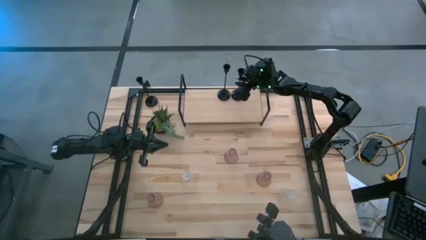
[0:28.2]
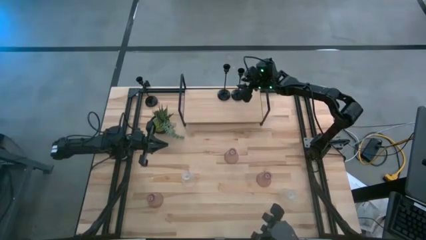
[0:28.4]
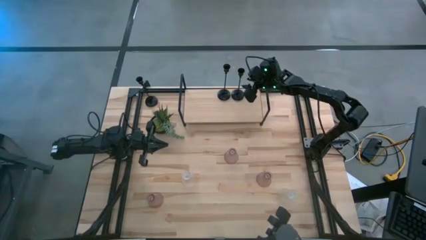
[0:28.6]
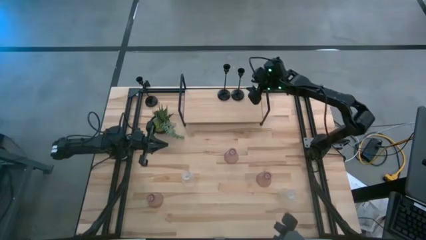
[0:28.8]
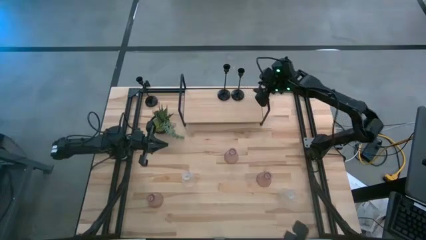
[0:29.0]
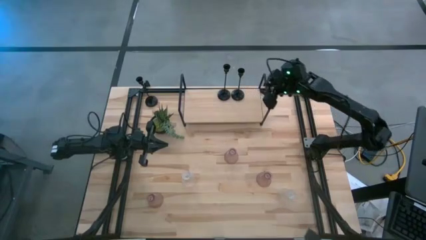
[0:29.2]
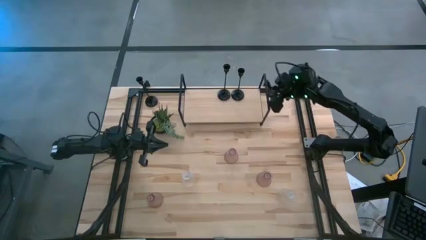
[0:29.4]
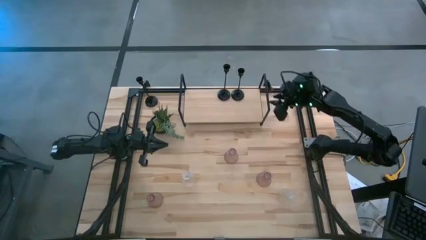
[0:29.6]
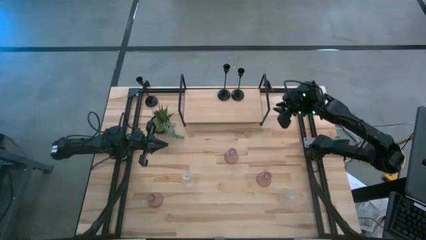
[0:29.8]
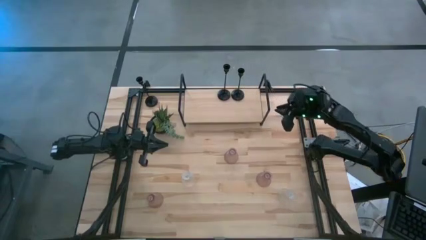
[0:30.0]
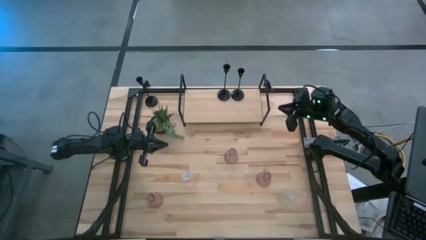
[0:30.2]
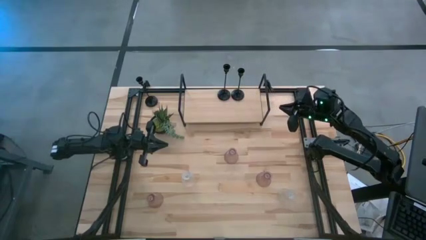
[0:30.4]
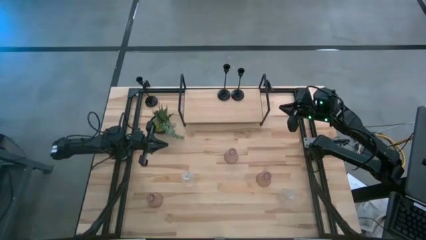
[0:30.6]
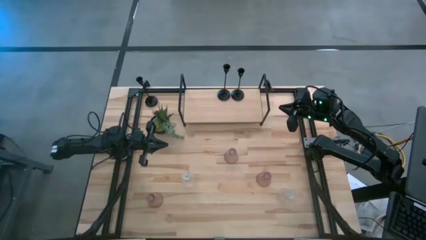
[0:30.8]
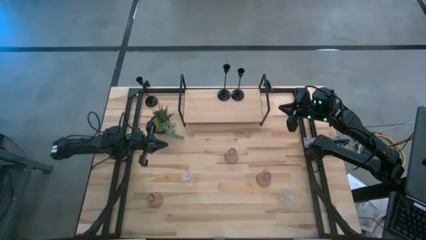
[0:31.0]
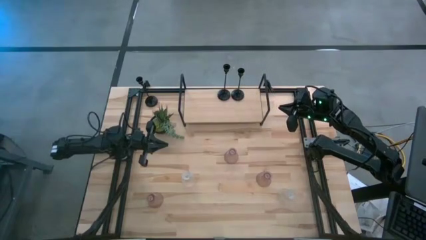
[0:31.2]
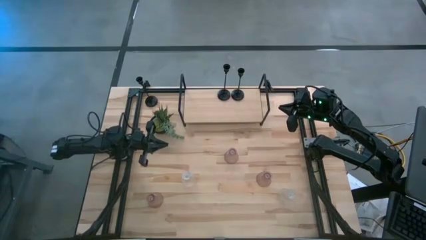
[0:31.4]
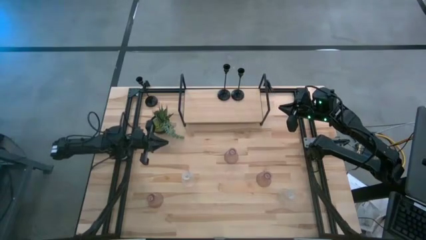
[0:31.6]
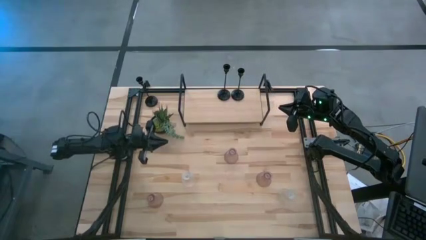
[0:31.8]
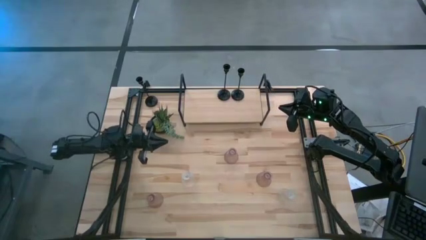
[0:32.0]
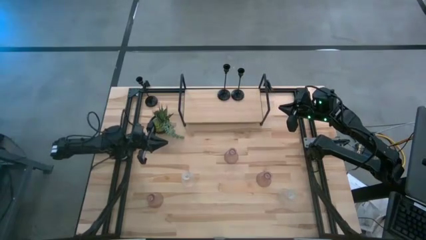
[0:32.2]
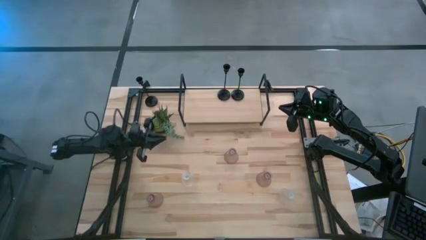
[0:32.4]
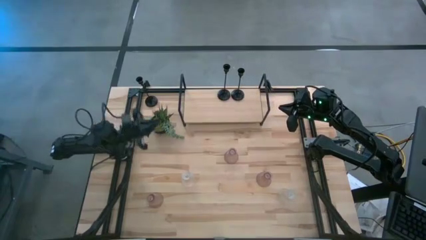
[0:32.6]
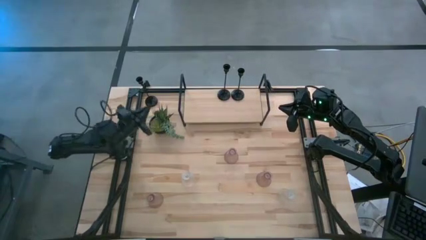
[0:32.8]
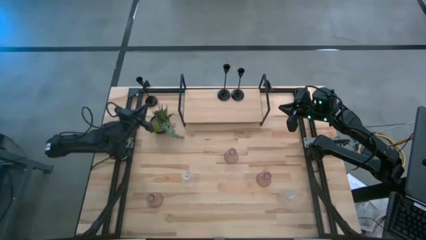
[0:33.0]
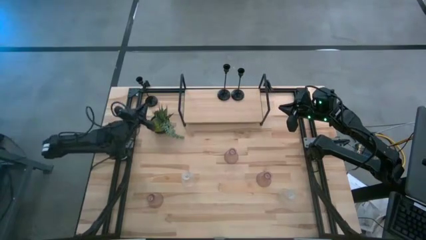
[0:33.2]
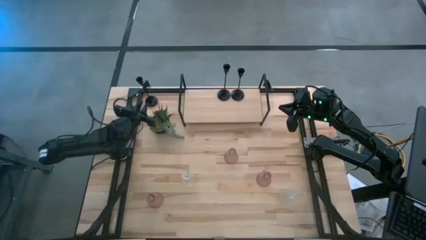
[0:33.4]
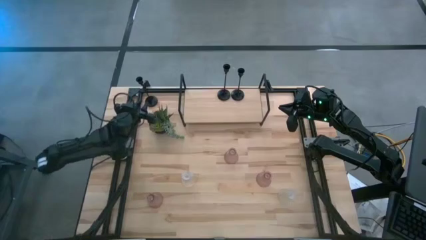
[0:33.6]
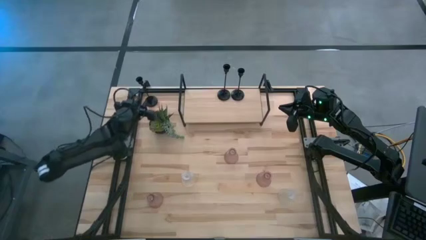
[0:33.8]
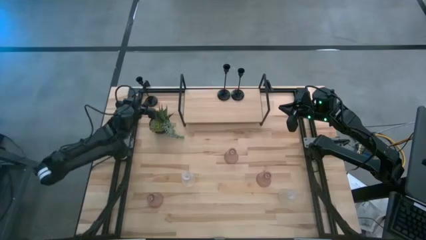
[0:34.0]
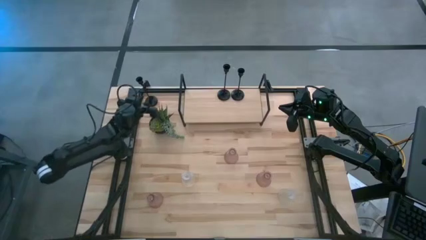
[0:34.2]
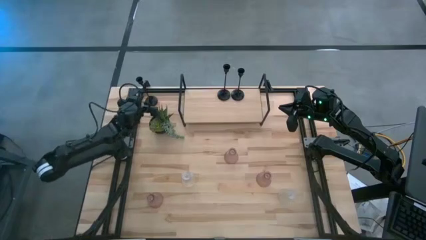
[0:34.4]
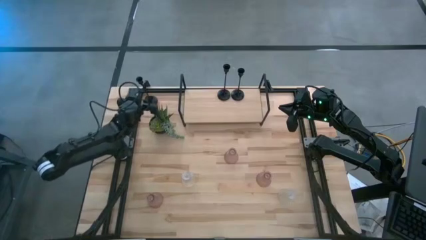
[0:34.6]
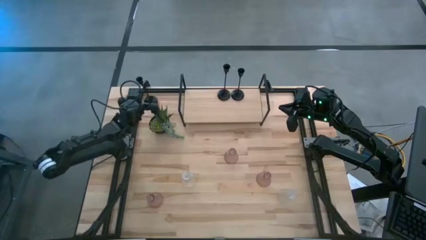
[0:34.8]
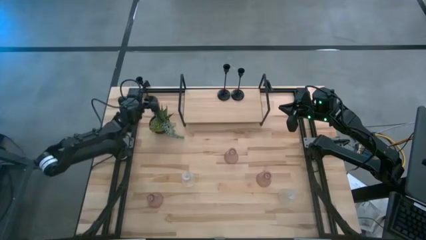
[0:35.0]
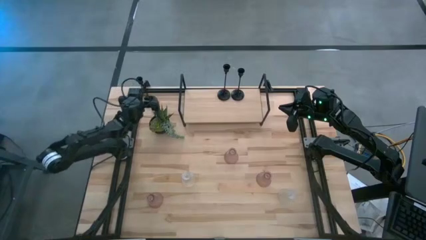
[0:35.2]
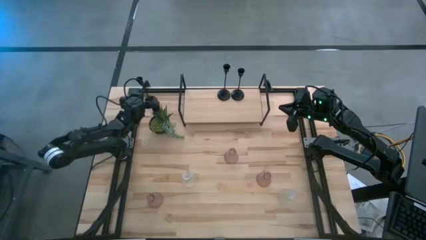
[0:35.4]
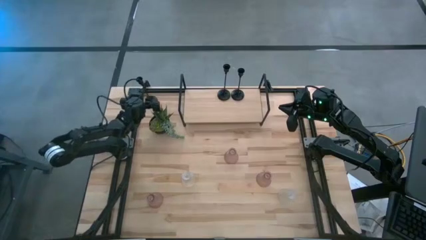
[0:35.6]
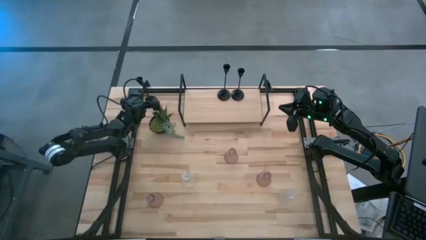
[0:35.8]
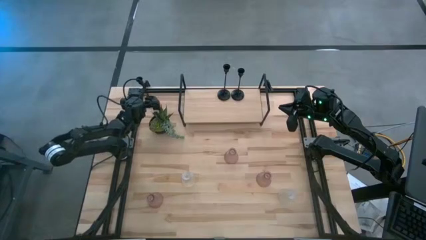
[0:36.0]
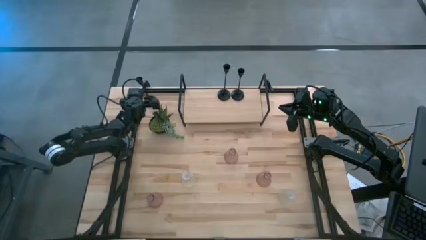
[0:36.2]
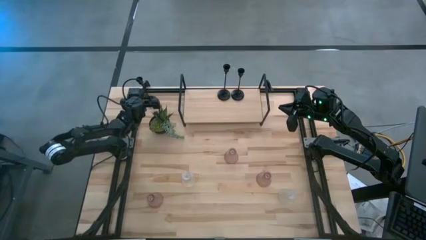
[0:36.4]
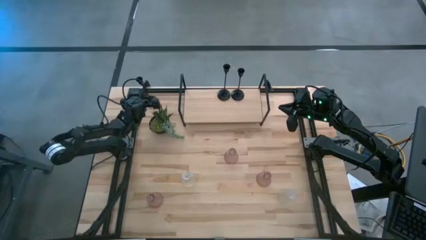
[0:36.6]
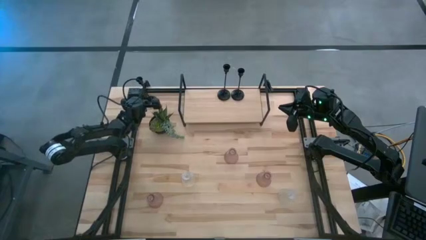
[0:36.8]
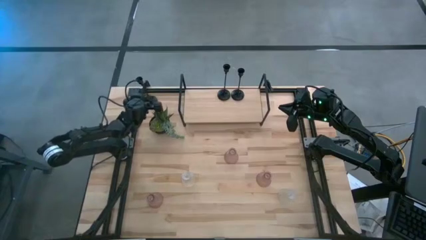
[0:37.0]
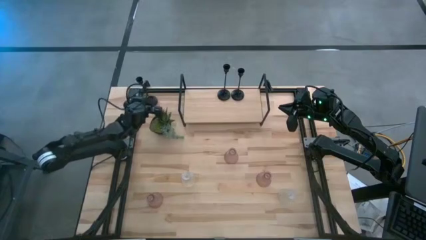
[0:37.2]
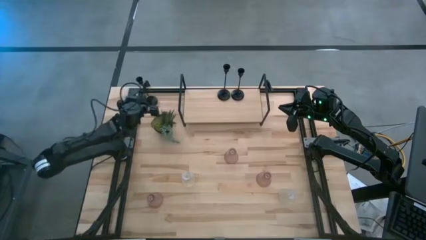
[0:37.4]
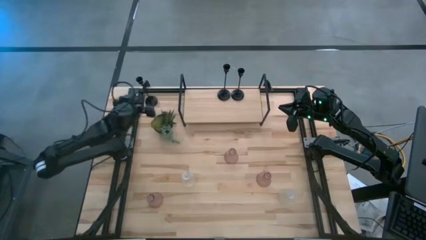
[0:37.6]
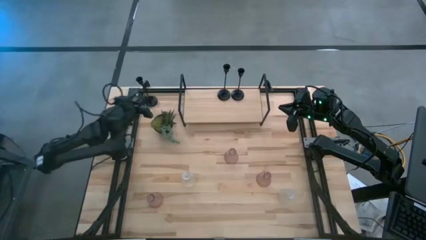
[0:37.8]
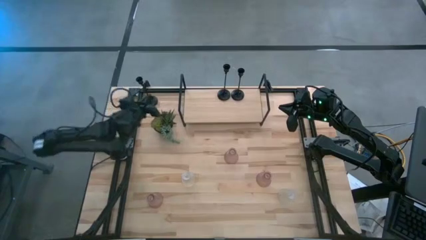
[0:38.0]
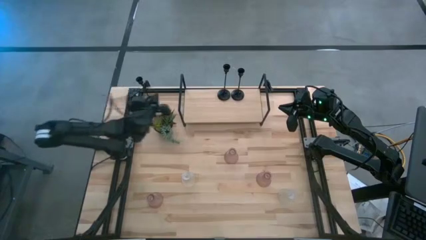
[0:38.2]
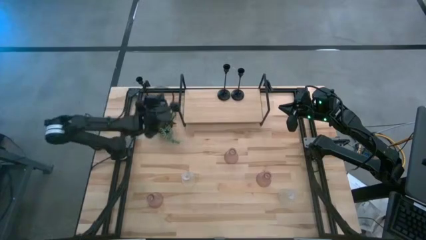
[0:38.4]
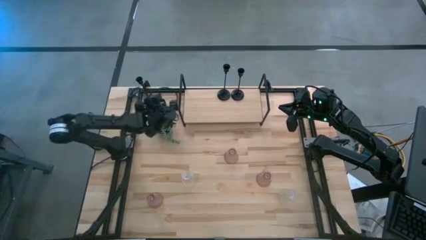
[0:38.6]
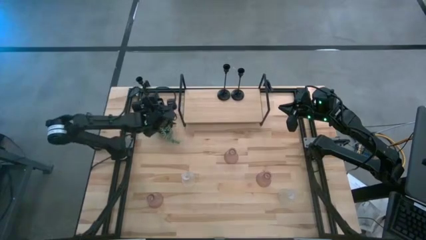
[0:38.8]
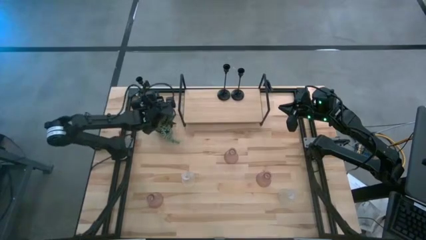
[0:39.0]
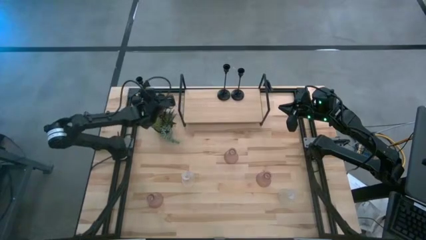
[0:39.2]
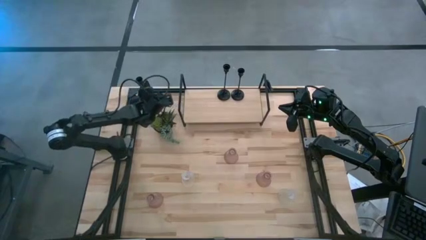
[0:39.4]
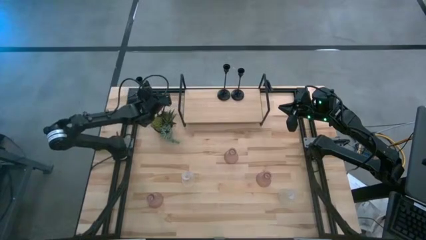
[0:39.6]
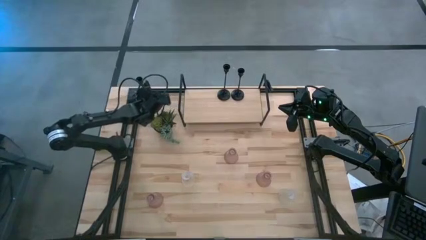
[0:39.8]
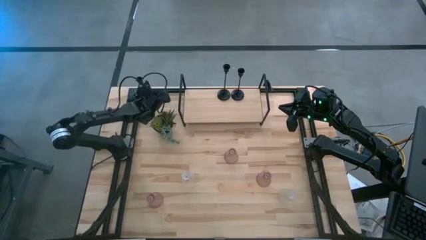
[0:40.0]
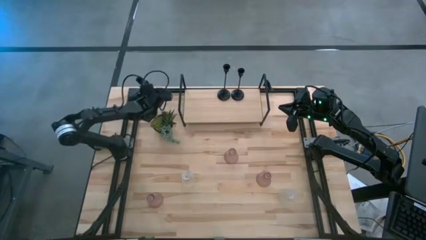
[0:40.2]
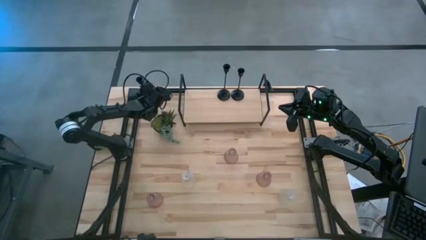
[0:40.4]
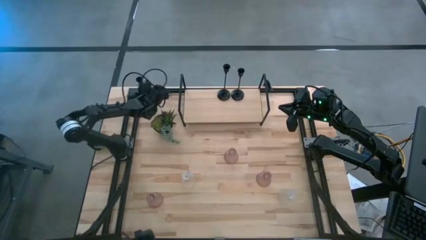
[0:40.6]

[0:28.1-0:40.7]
Task: Pick & Place candle stick holders
Put the black candle holder on the shelf aligned with the other black candle holder

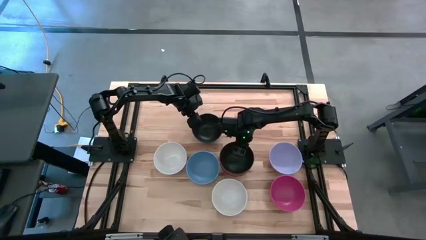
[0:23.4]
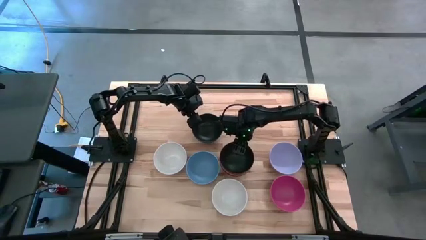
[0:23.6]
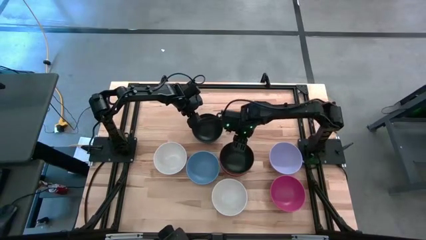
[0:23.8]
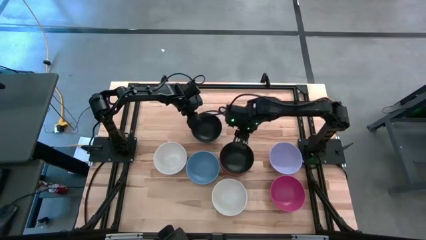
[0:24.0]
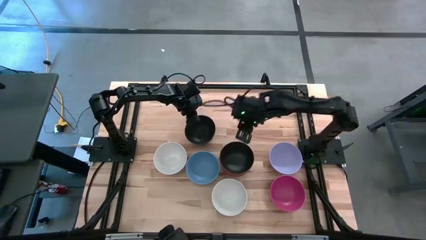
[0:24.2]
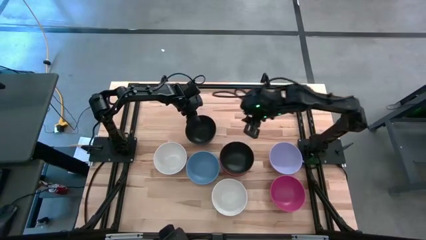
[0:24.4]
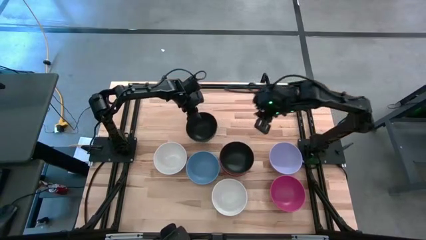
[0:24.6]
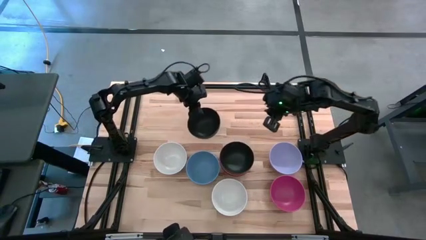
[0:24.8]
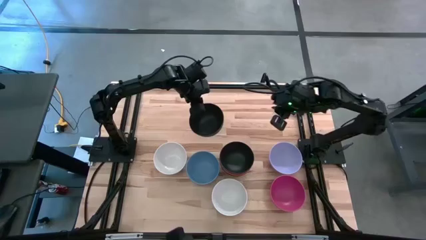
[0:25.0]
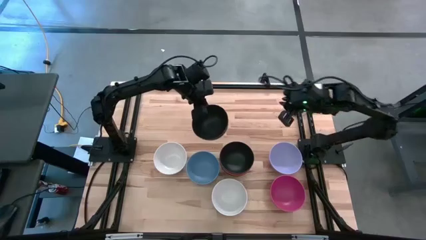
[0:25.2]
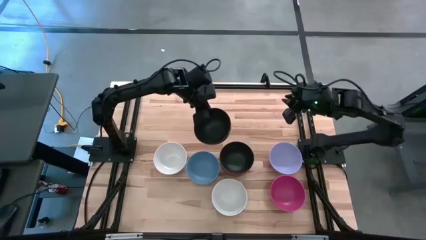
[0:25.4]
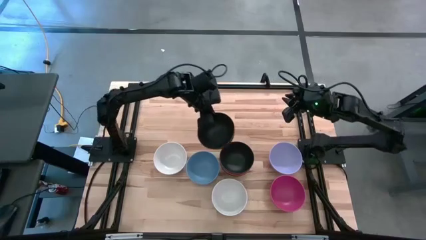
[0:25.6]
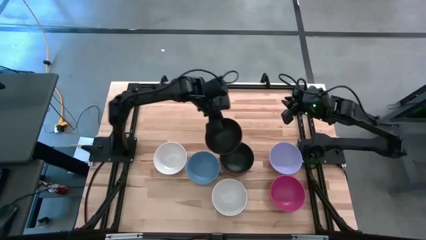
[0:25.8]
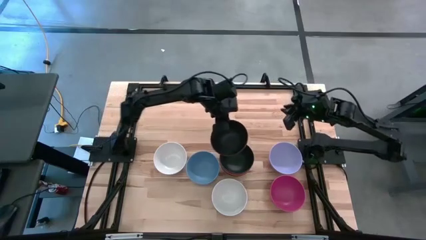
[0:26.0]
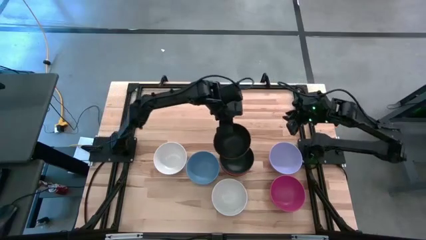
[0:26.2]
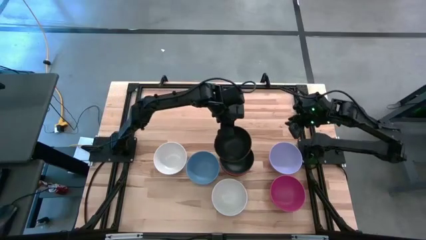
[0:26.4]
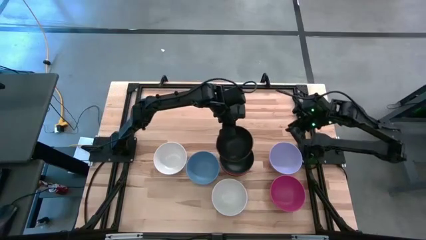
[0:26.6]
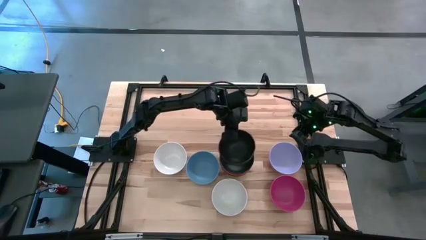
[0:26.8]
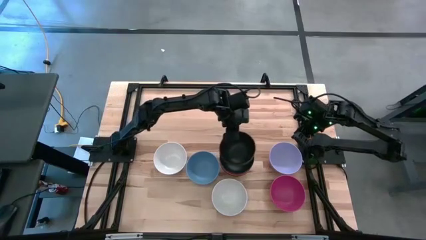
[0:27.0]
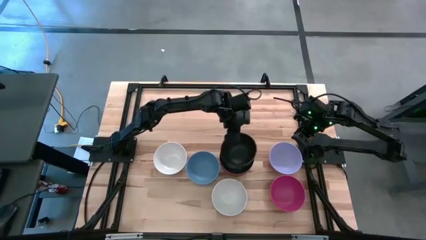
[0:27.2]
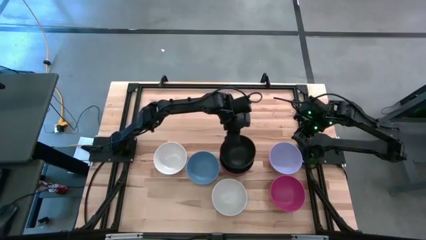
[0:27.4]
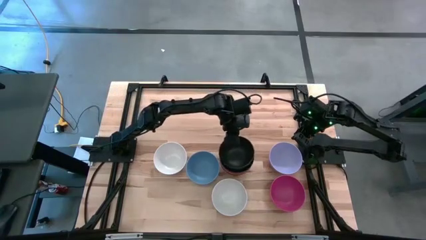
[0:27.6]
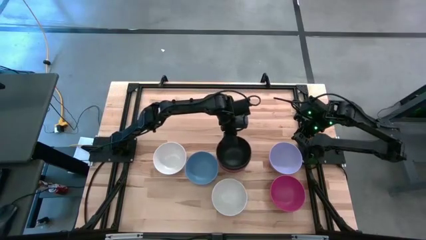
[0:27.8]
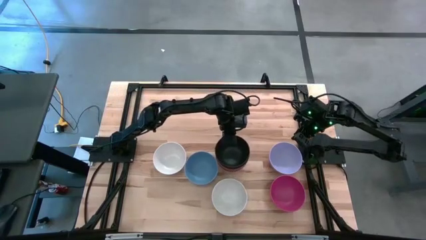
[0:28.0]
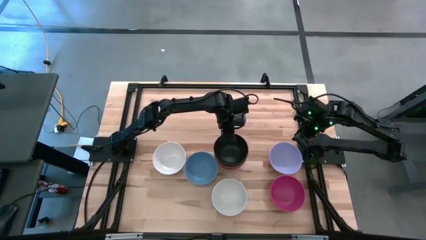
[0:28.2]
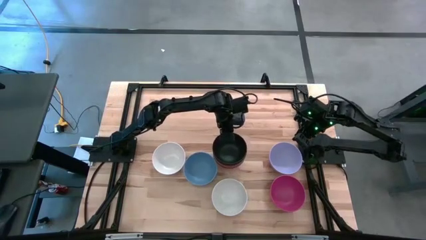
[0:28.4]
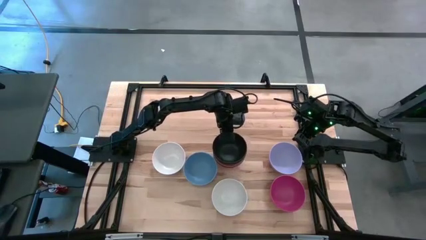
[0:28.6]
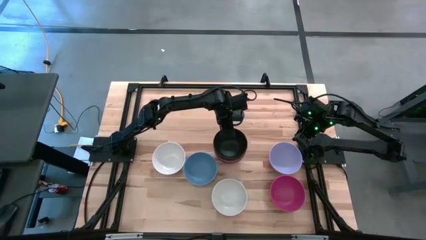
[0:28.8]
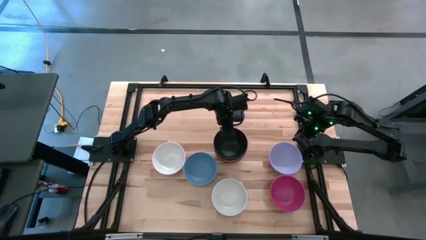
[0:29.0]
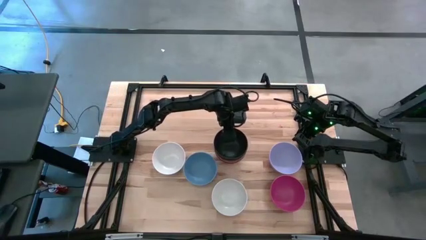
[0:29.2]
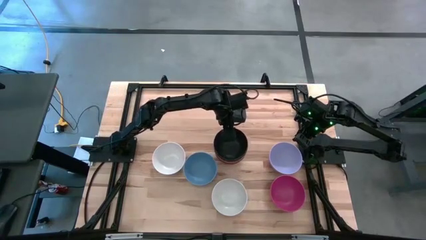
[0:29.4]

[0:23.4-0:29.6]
Task: Nest bowls inside each other
Stack the black bowl on the black bowl
